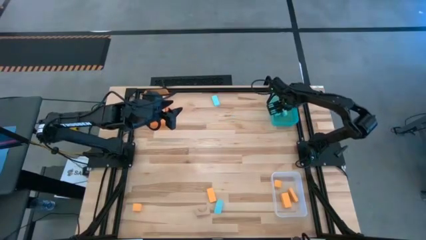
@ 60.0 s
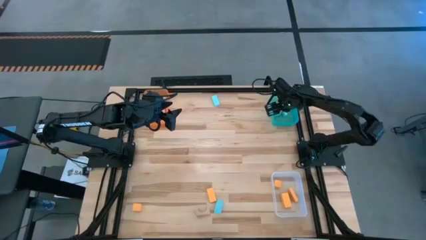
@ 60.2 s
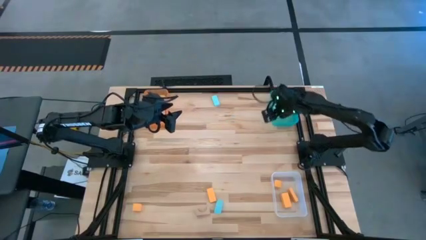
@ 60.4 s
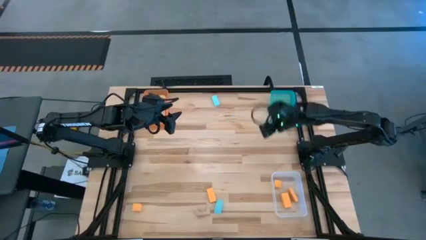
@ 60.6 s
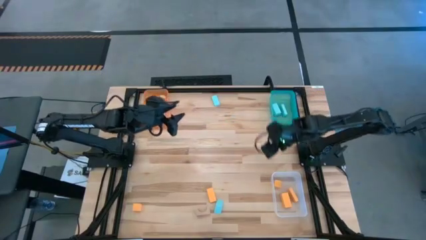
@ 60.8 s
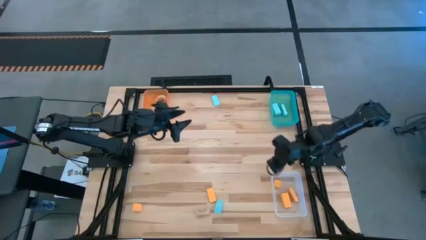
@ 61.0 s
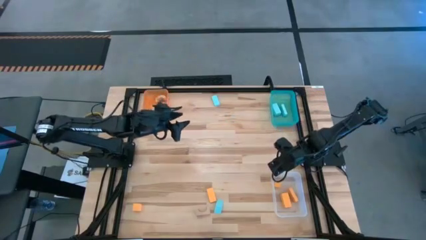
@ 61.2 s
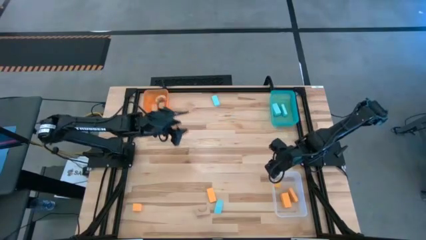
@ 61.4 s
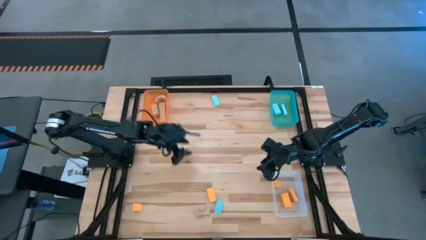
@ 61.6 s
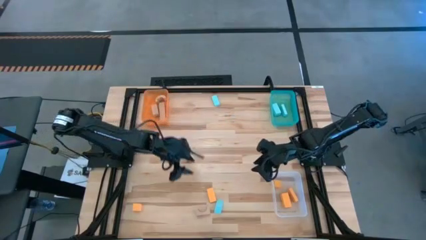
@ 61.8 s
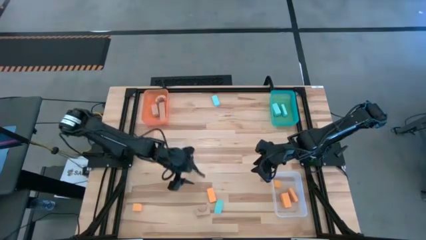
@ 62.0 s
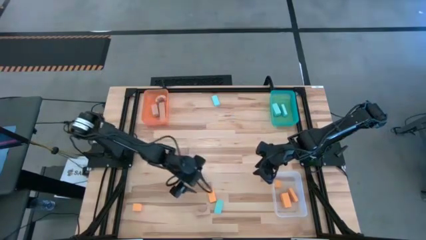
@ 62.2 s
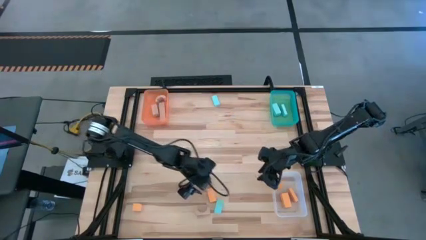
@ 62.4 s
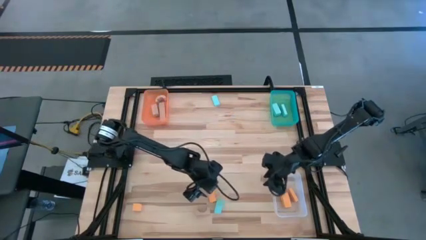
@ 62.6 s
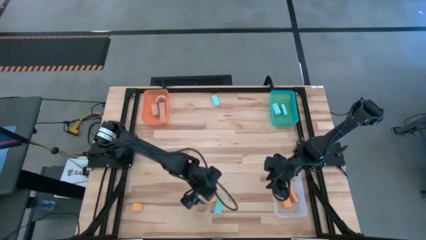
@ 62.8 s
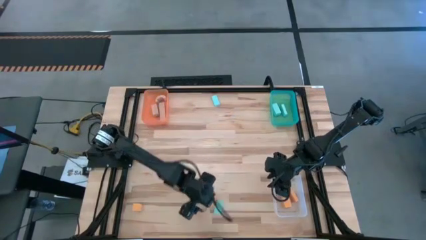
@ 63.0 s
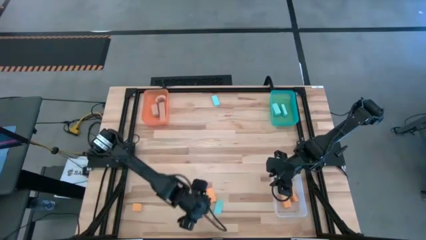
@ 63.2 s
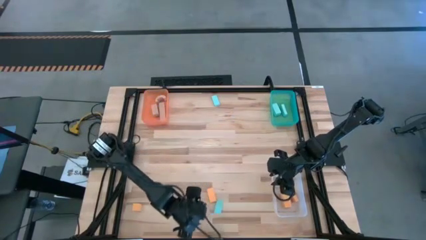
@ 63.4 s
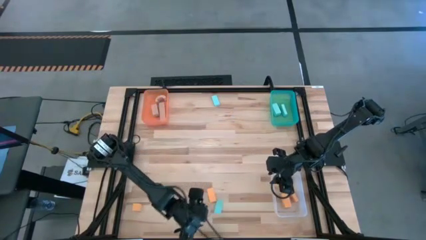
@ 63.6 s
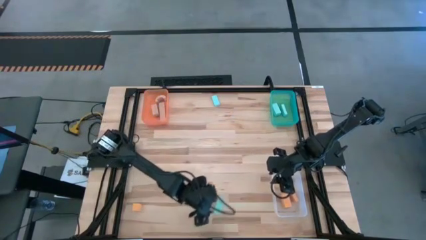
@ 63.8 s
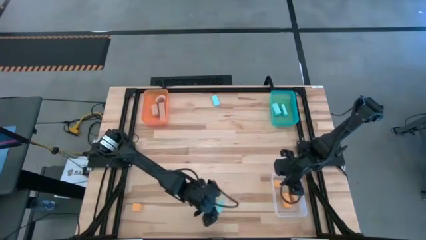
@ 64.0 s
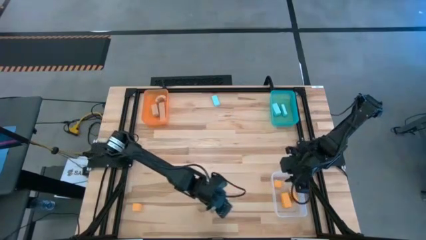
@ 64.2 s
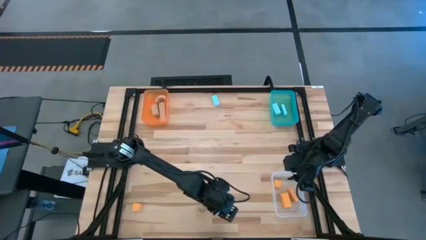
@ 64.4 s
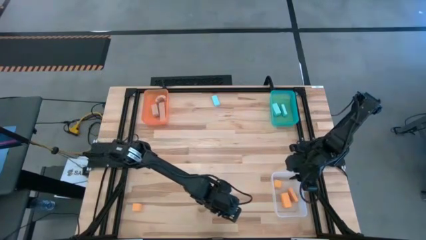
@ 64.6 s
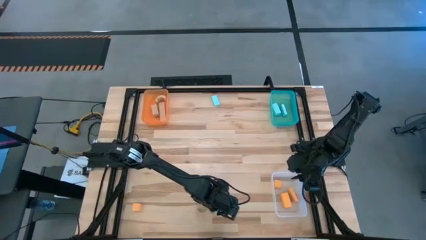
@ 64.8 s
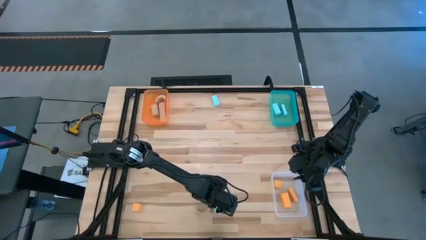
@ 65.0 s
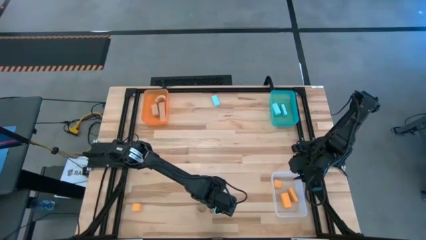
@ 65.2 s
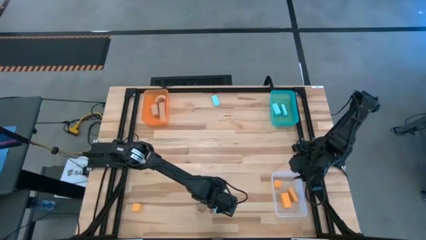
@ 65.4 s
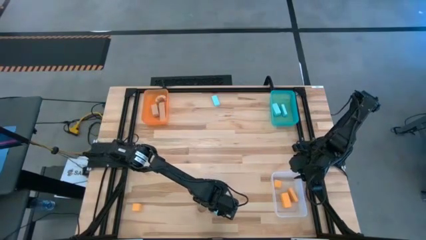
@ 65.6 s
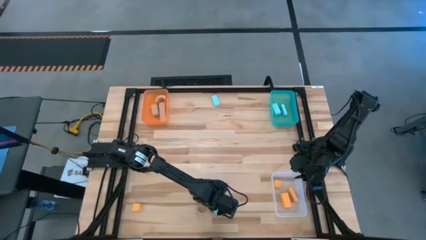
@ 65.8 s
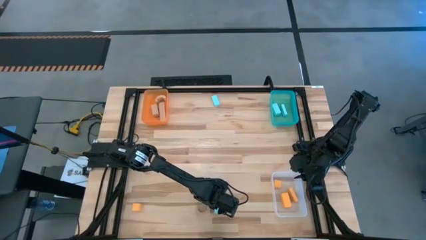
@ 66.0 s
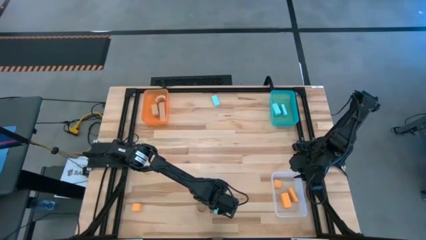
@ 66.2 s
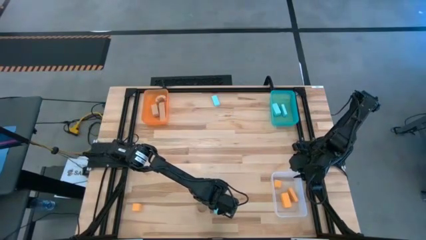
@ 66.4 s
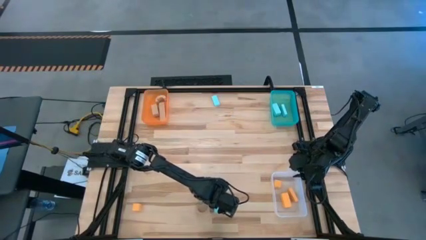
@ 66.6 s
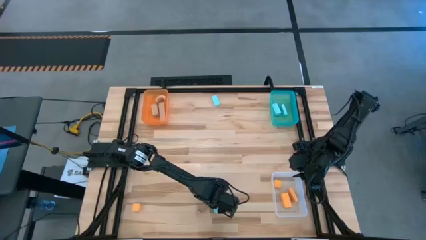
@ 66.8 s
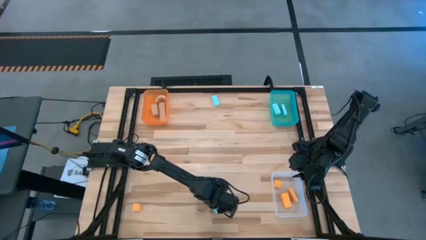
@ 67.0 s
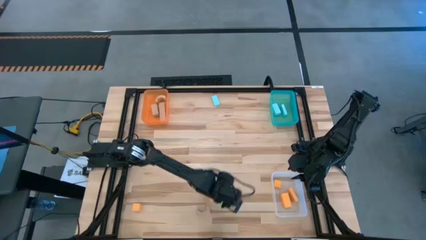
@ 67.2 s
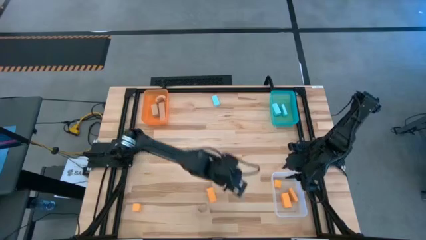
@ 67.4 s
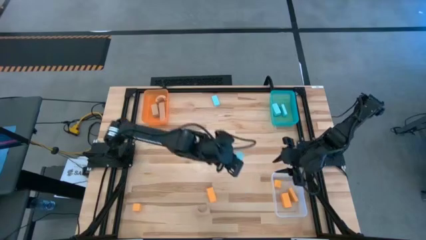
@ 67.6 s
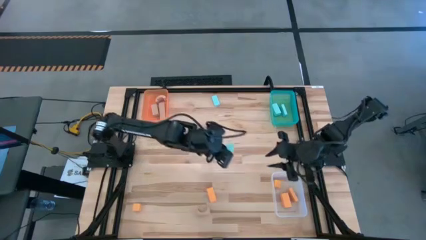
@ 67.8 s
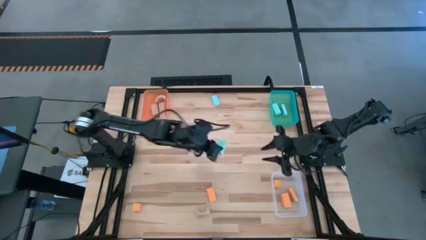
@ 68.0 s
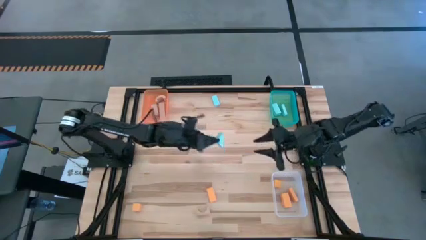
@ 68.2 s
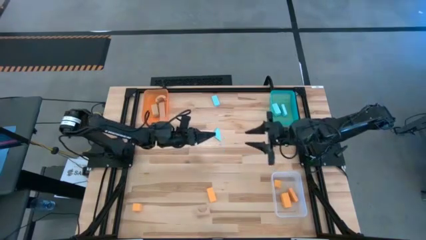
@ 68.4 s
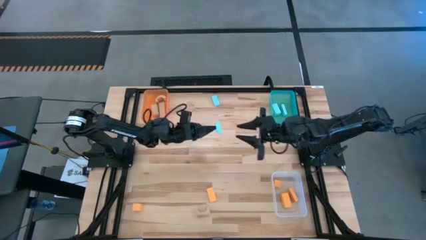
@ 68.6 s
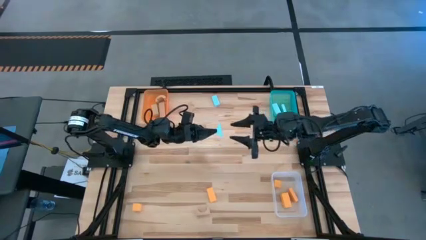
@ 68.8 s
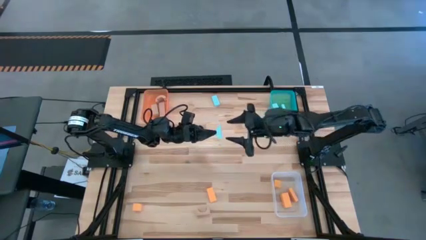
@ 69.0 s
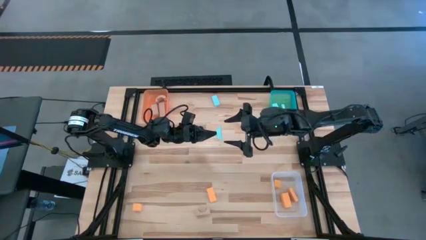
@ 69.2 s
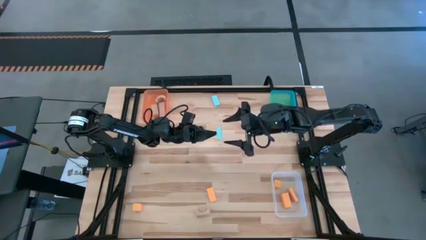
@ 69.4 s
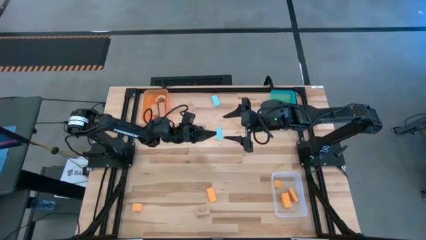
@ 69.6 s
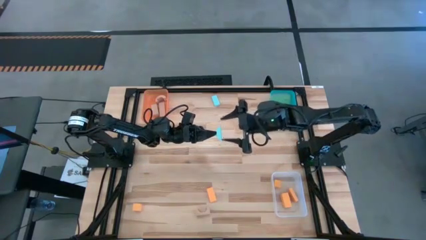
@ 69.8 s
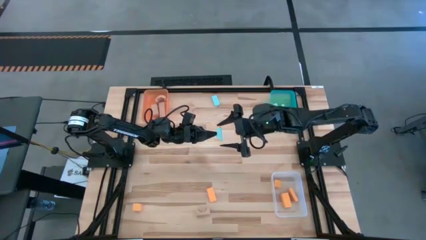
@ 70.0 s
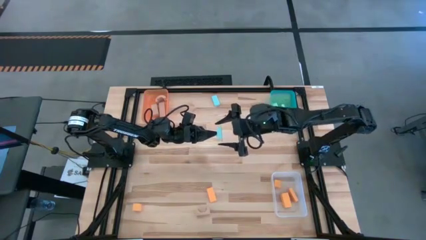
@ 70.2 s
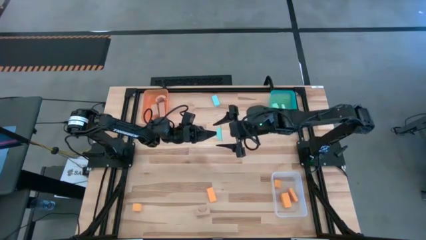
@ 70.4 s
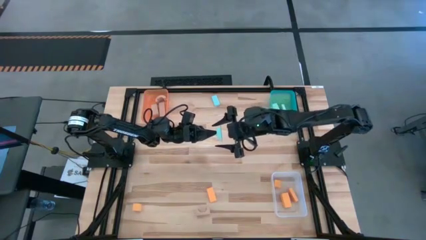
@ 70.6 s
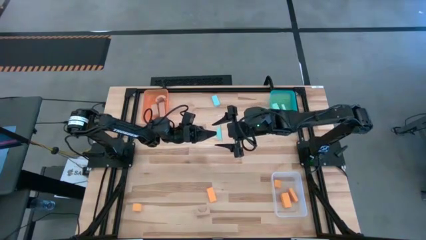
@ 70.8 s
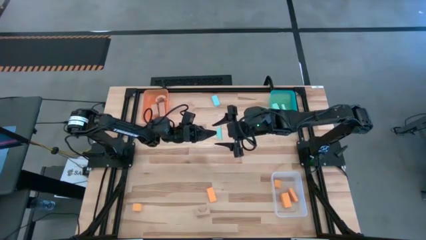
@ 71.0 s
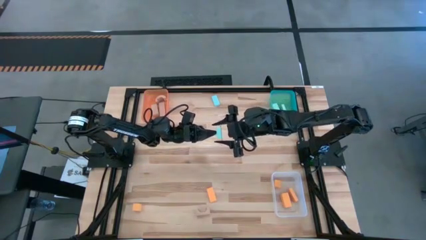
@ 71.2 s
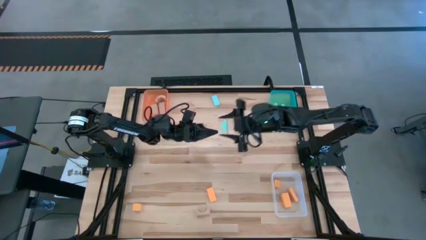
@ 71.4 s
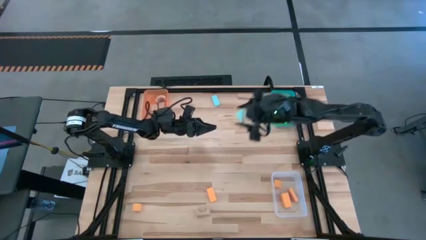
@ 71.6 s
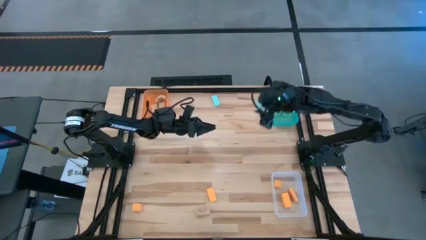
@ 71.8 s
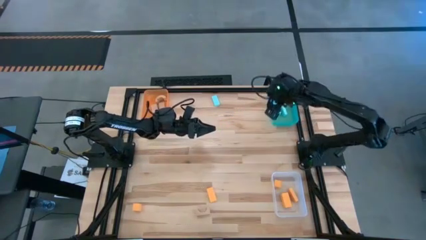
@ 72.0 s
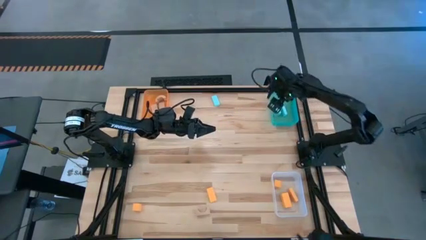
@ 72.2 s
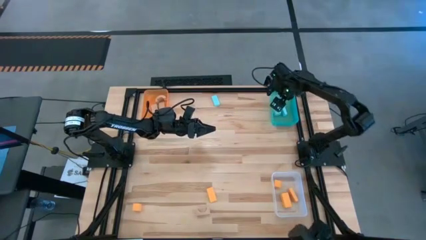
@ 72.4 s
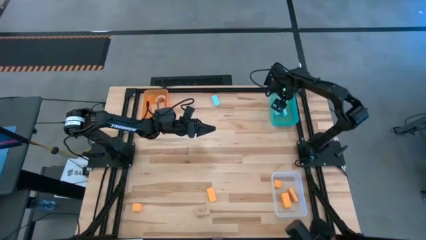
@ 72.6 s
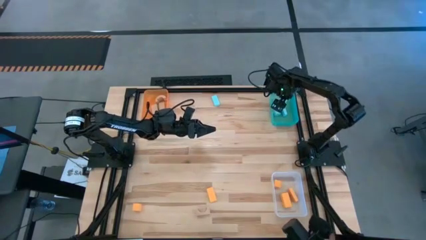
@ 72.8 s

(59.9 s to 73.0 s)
Task: Sort & place blocks by color
Put the blue block into the blue bin

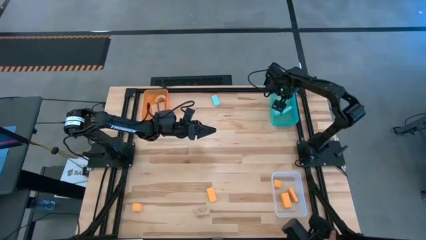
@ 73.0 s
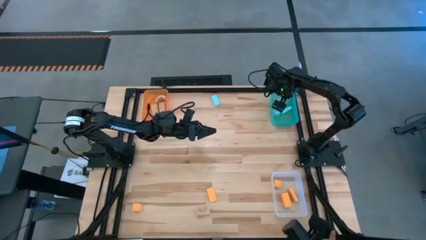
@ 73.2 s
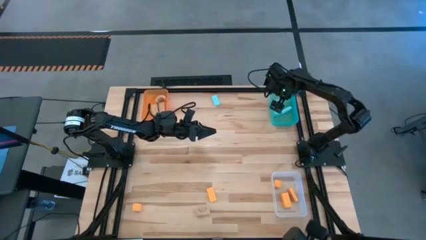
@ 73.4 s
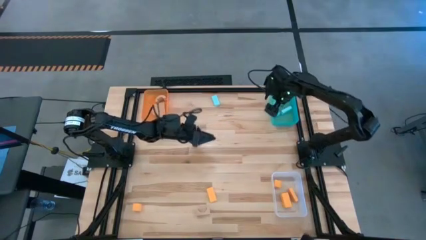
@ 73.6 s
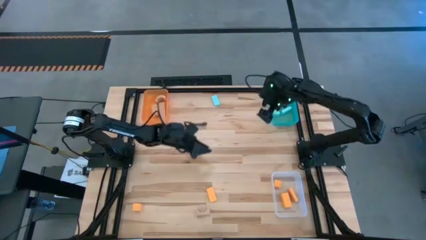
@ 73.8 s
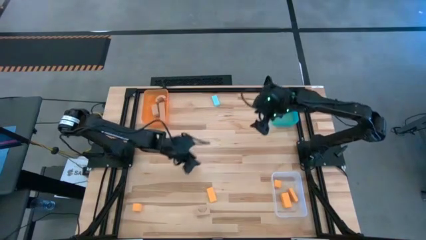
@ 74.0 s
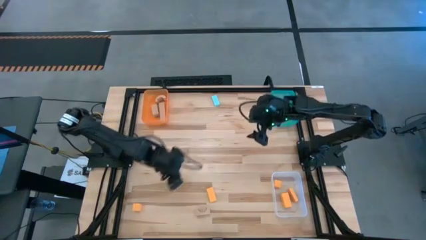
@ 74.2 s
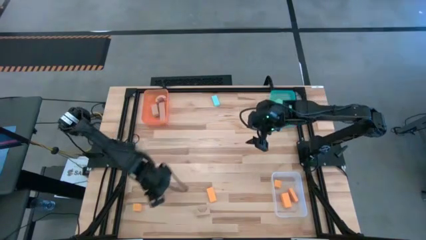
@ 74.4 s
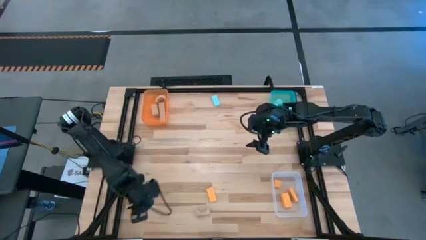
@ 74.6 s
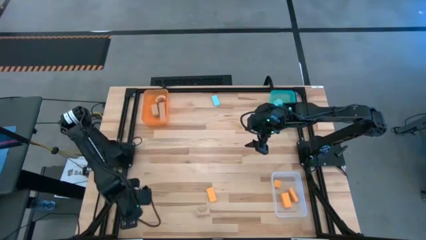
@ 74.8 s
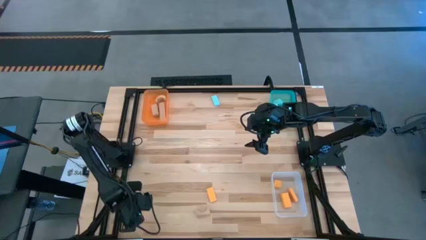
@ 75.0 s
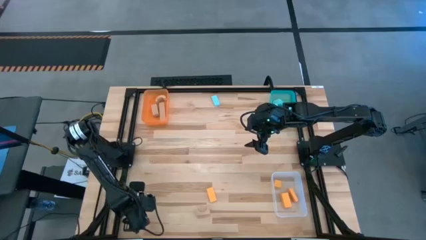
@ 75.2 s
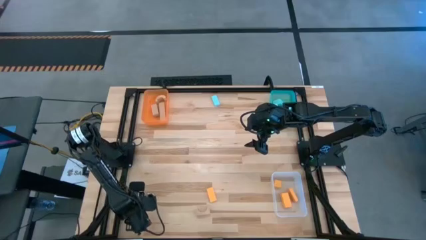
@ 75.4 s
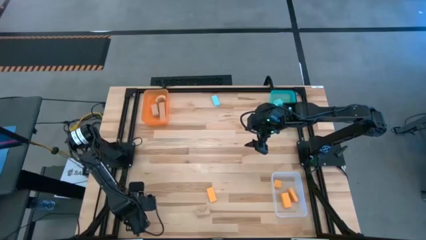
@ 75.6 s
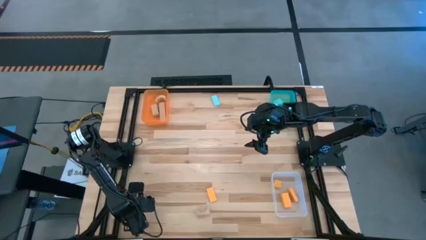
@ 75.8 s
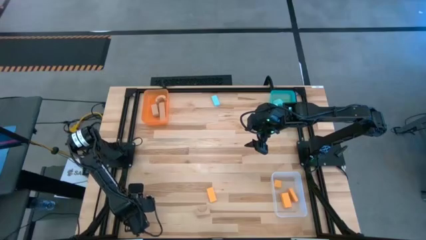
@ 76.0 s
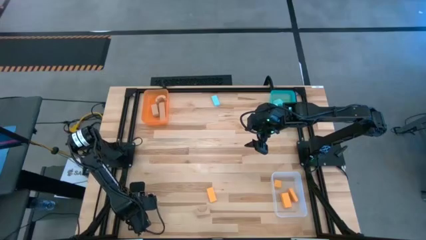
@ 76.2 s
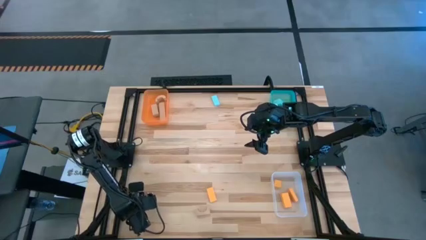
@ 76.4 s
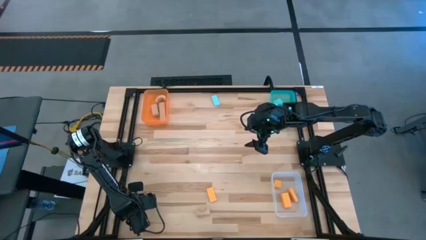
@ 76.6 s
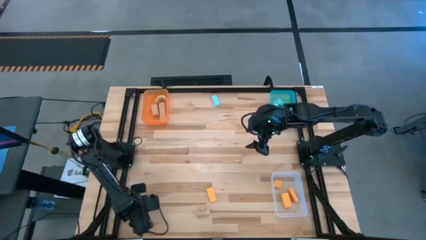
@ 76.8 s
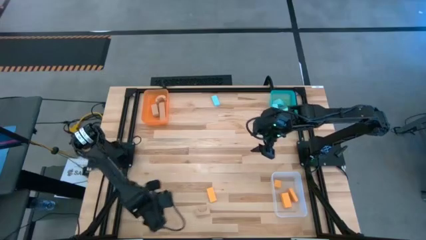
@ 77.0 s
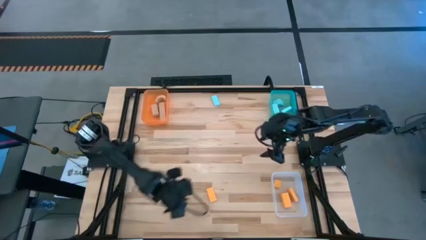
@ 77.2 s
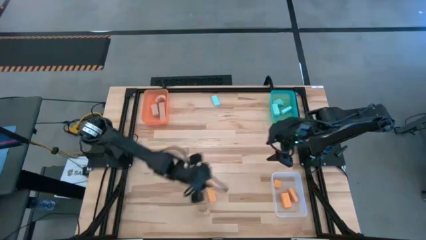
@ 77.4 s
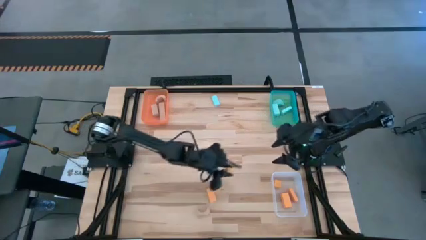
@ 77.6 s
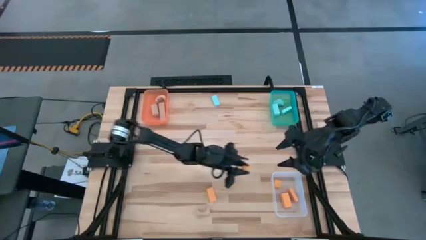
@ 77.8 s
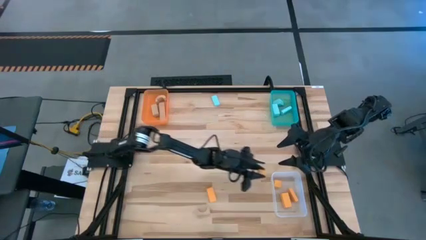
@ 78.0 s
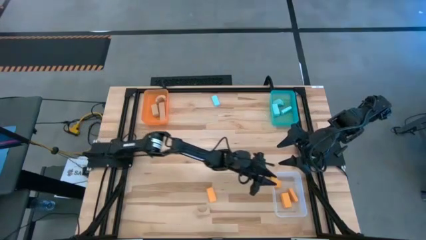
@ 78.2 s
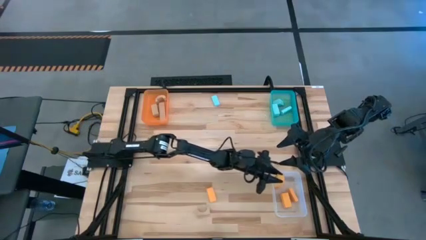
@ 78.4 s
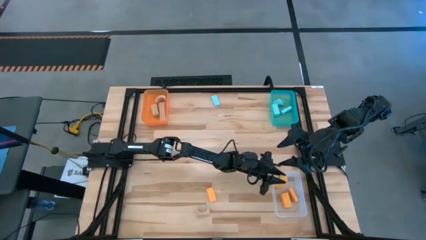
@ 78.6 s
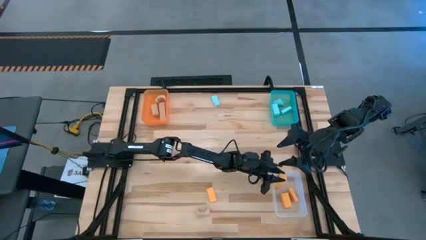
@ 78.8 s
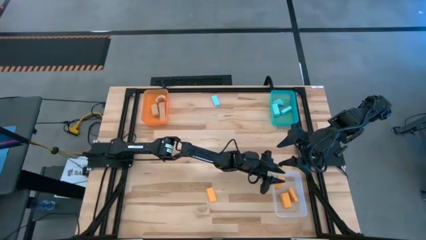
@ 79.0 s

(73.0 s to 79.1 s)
Put the orange block into the white bin
